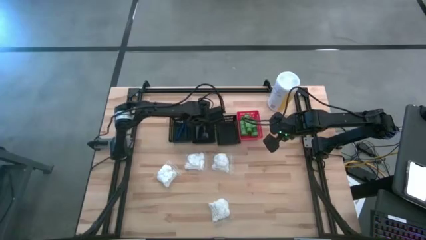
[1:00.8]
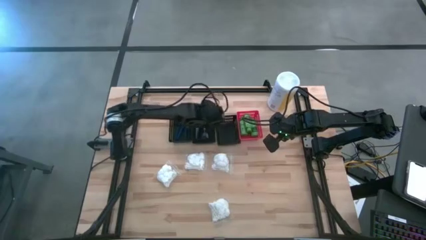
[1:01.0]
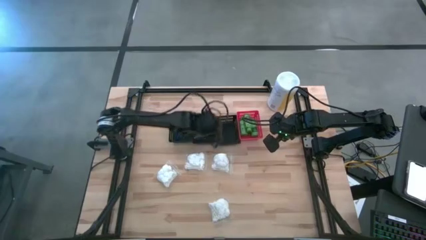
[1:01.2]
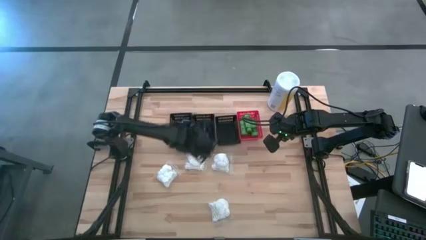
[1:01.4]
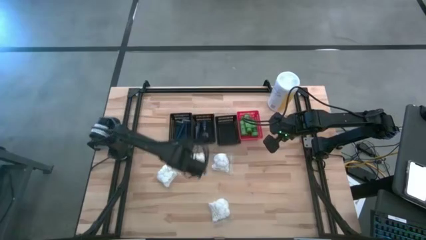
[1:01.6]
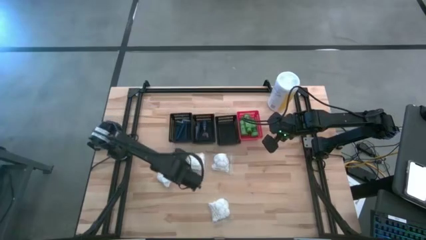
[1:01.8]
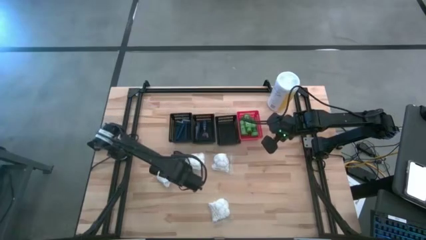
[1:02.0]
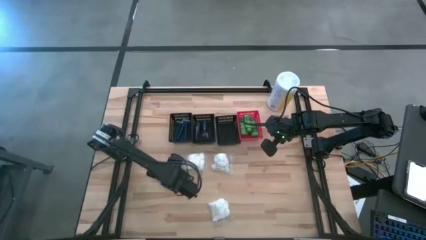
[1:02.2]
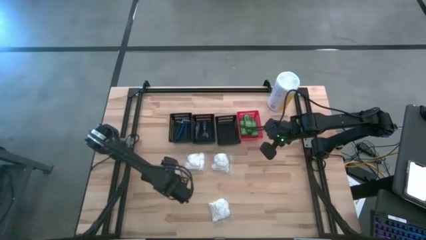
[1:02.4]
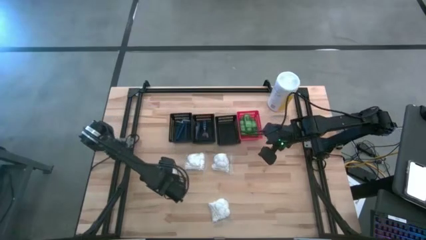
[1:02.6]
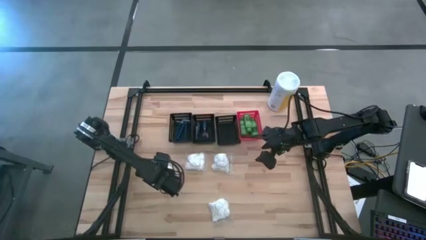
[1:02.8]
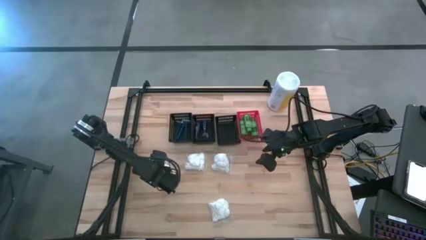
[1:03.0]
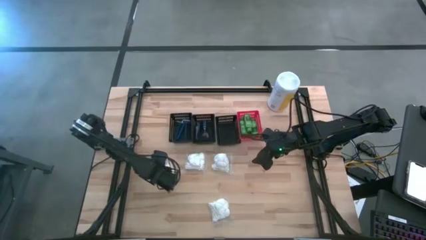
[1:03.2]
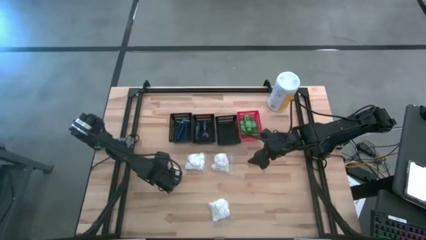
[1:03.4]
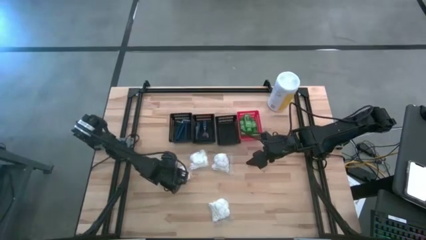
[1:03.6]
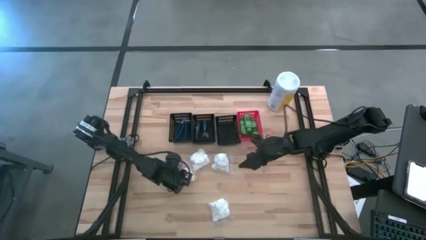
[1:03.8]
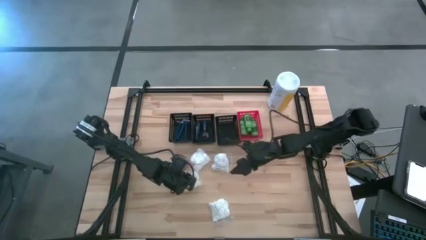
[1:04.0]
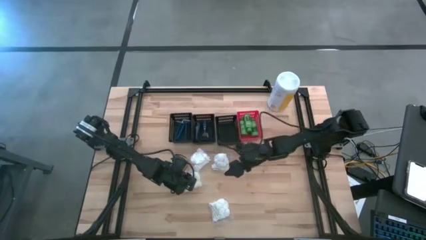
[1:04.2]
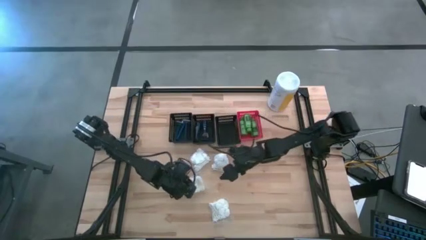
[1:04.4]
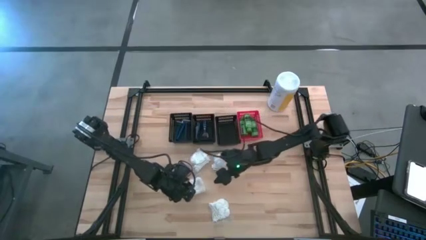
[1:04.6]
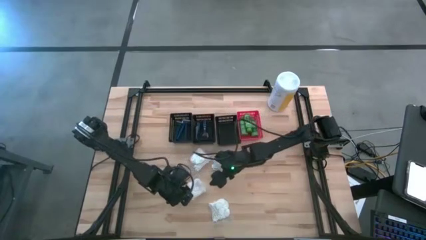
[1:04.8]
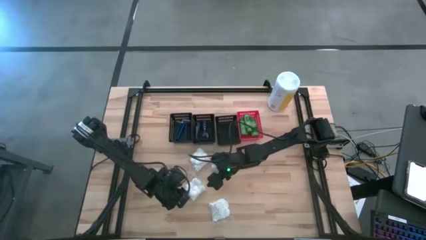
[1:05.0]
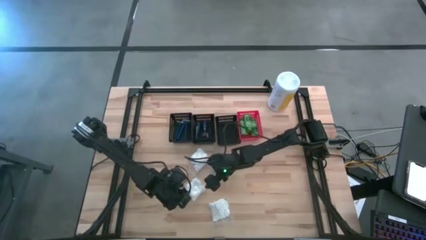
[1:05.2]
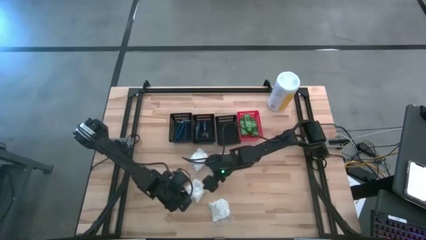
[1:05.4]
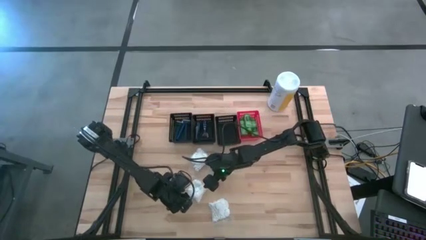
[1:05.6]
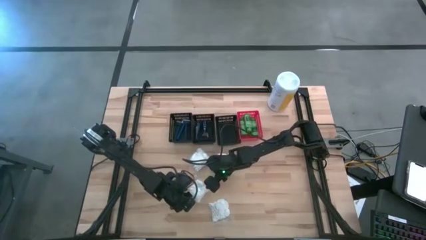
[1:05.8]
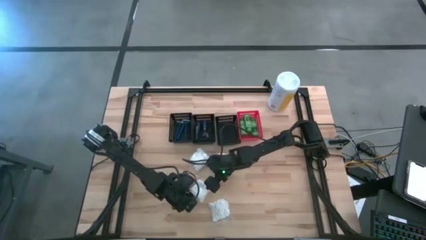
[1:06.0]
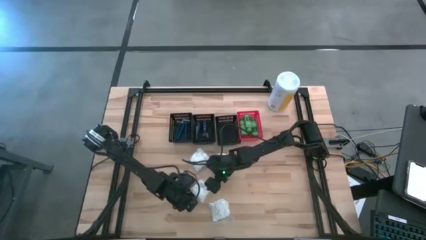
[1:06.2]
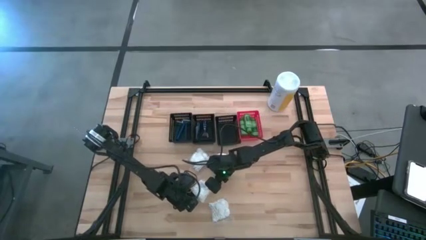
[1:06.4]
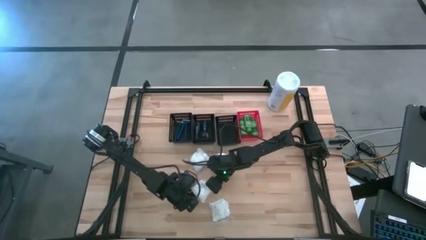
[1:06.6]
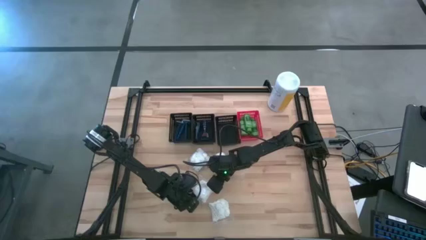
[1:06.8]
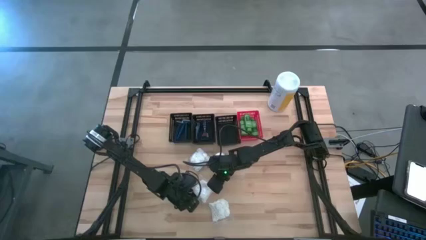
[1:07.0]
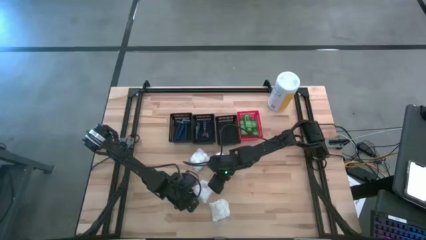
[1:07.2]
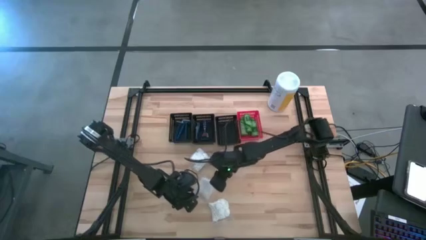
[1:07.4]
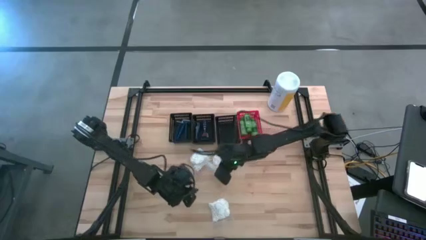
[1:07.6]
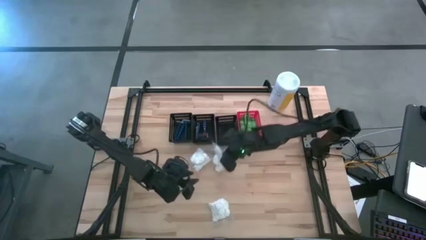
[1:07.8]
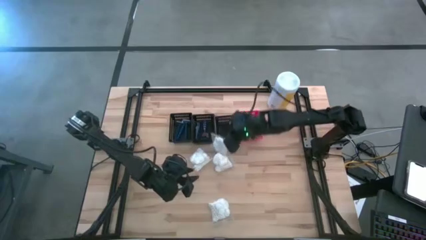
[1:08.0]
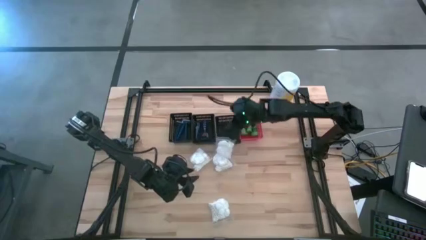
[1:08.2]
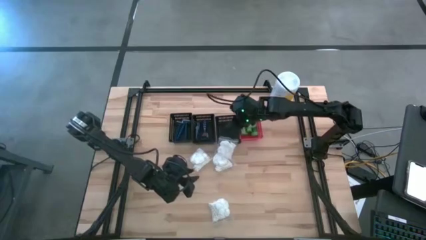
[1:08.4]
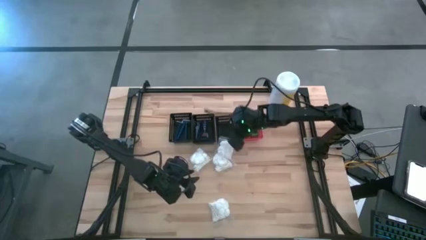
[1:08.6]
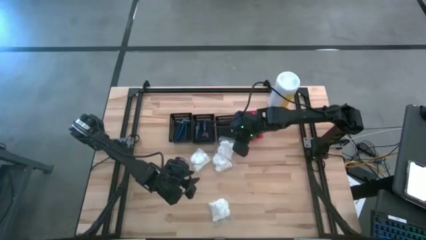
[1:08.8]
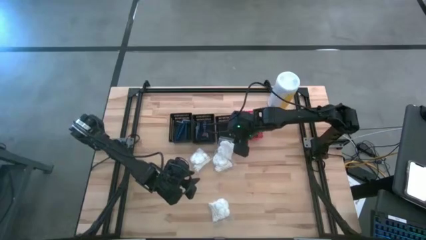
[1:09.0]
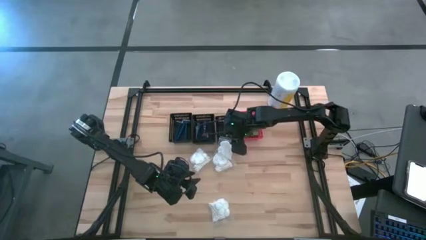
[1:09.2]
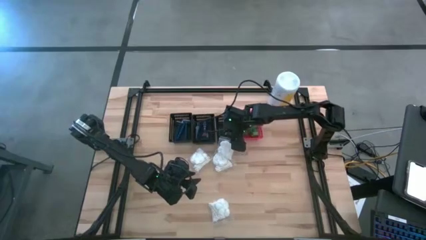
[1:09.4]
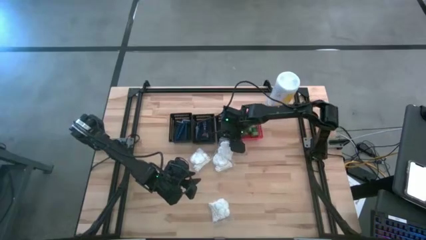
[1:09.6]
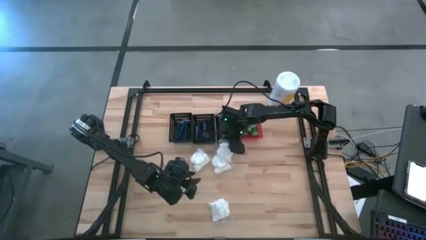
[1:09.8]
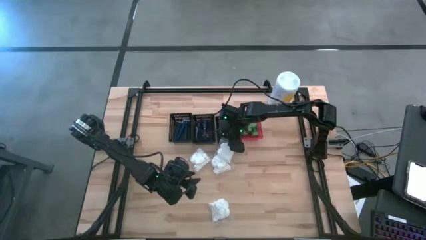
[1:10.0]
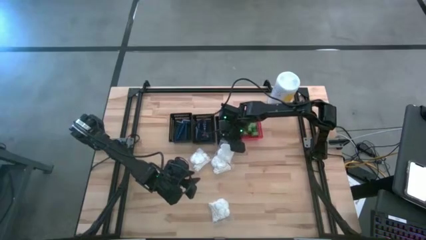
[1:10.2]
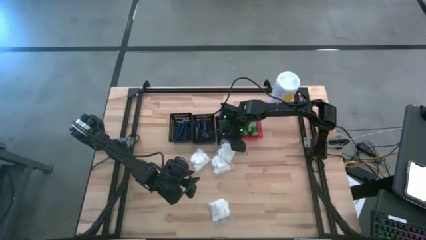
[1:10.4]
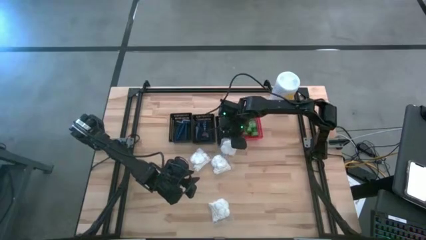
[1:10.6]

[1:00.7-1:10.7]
Task: Pick & Place Travel size toiletries
Put the white cotton pack into the right black bin

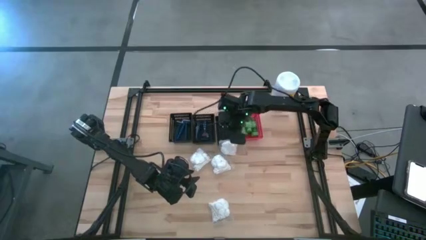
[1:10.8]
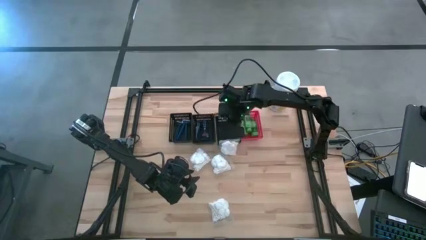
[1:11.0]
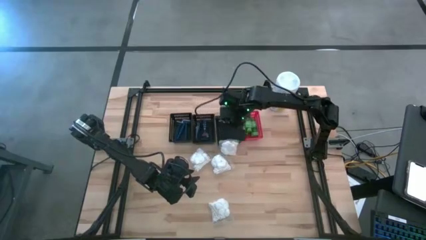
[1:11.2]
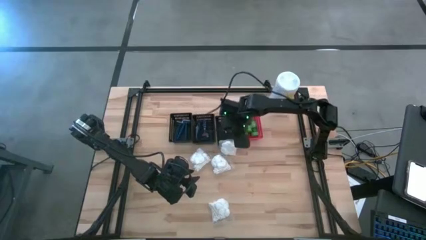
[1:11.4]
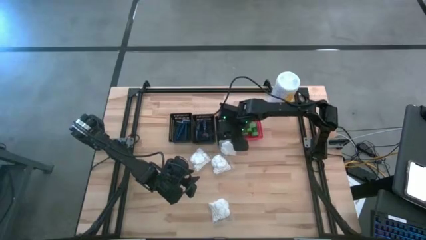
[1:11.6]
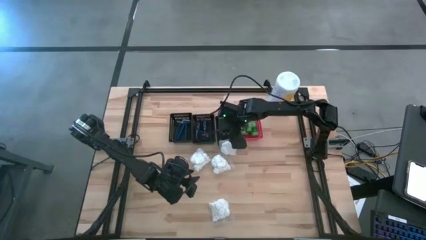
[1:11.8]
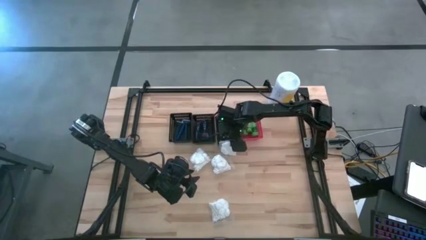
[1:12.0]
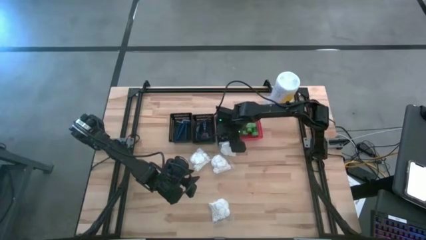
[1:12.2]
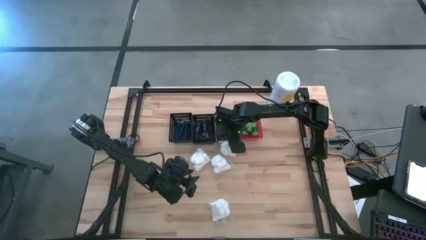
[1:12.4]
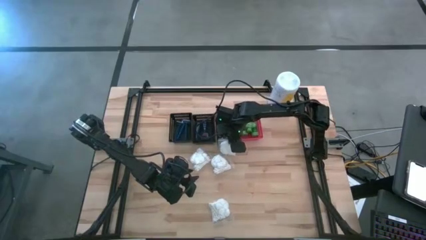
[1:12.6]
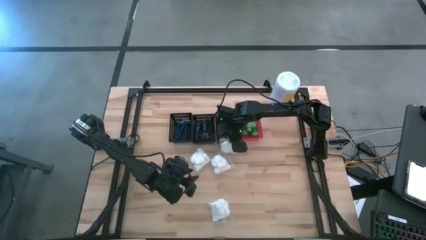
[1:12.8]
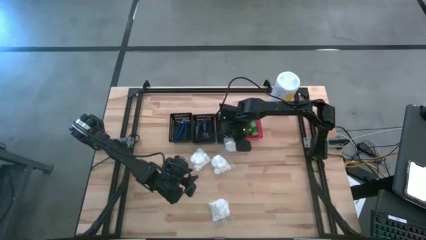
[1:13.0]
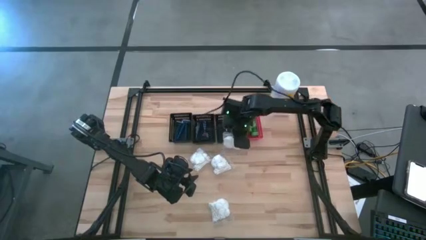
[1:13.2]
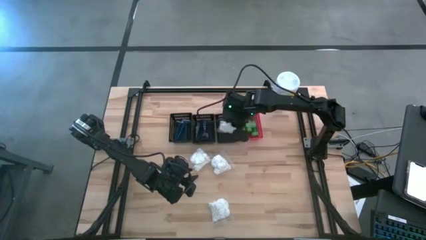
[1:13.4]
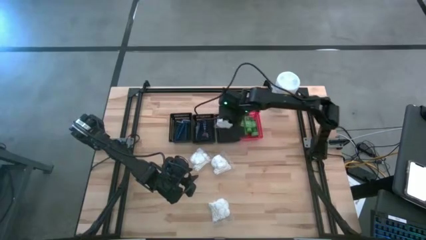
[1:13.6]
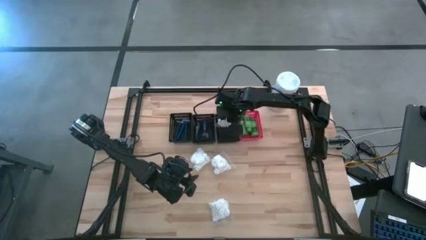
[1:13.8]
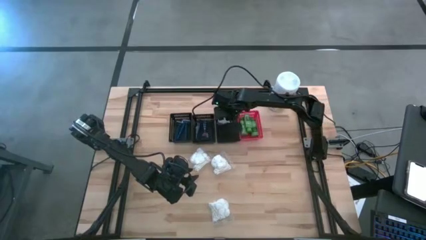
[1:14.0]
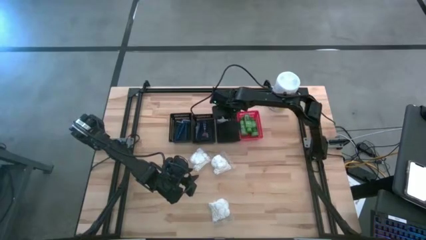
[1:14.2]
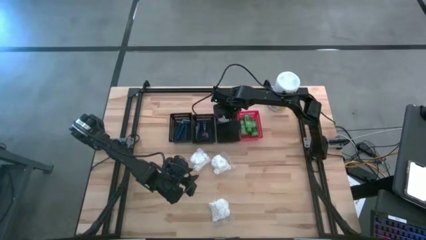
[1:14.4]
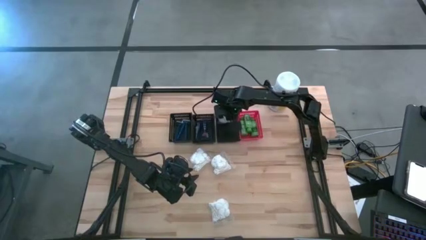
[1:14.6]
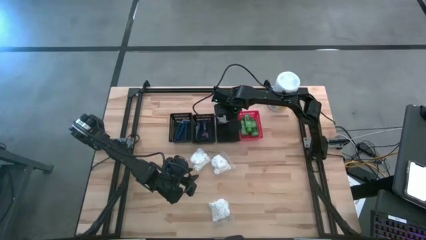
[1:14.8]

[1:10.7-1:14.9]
Put the white cotton pack into the right black bin

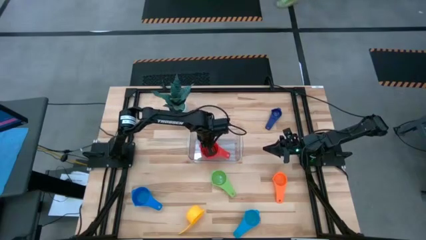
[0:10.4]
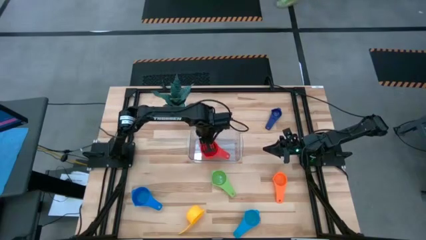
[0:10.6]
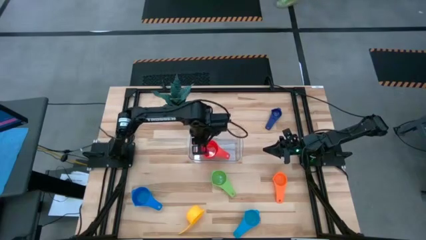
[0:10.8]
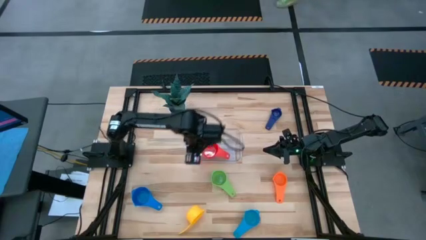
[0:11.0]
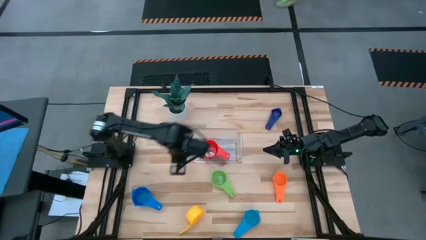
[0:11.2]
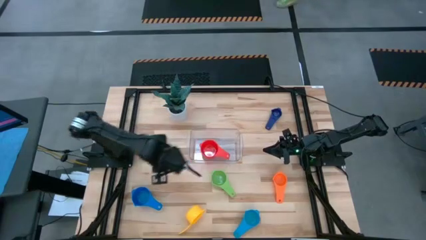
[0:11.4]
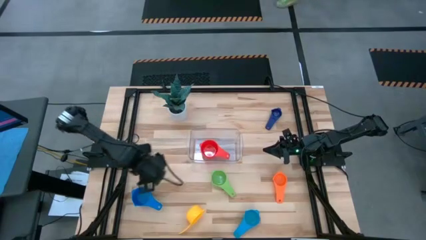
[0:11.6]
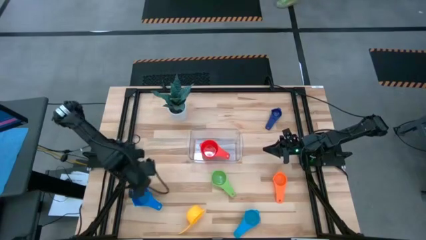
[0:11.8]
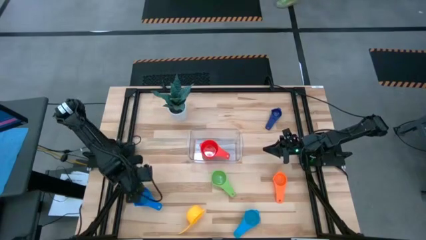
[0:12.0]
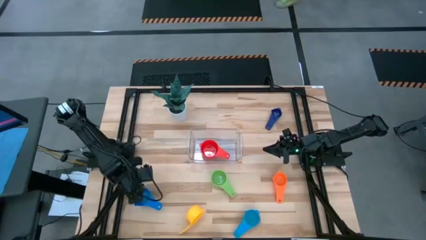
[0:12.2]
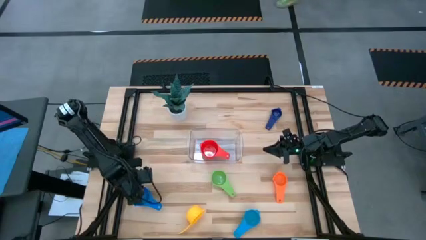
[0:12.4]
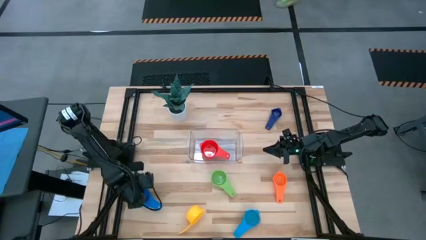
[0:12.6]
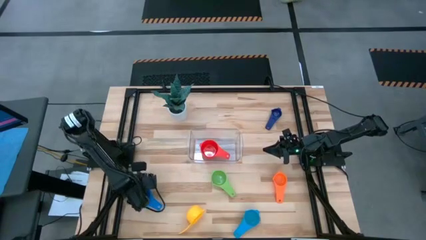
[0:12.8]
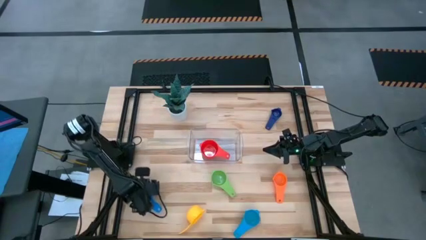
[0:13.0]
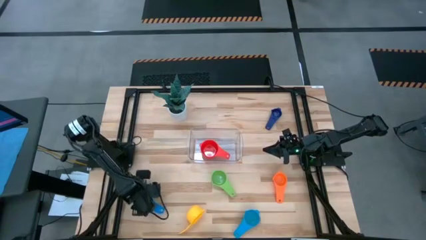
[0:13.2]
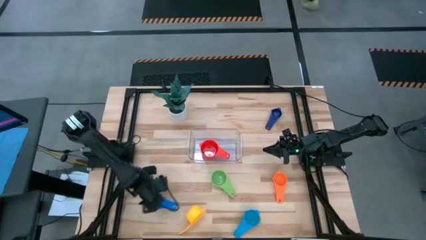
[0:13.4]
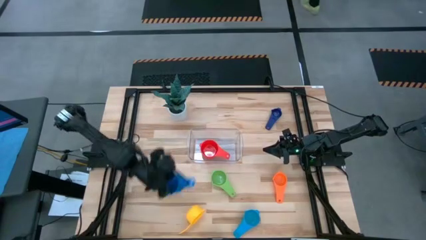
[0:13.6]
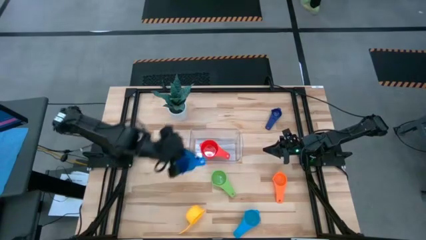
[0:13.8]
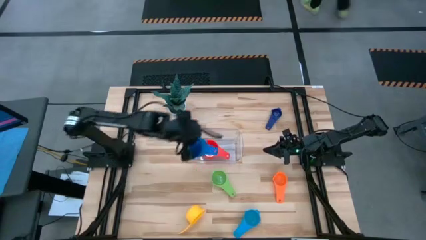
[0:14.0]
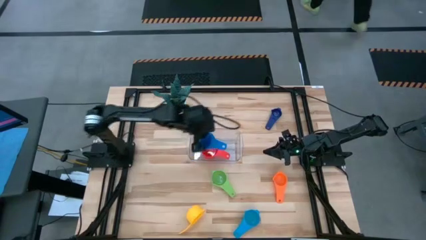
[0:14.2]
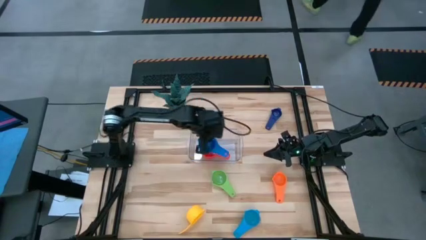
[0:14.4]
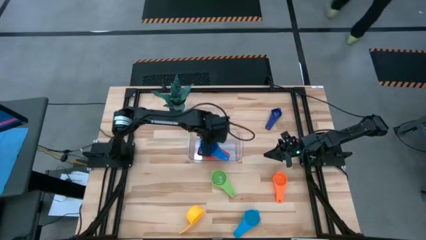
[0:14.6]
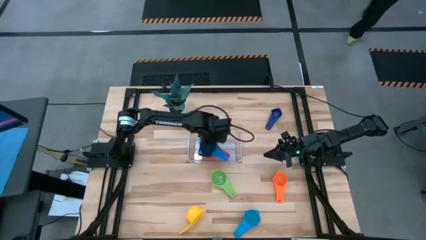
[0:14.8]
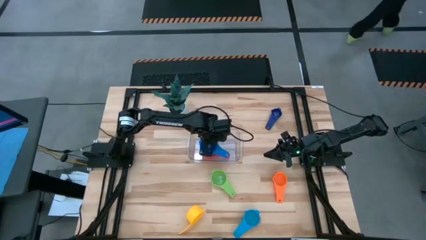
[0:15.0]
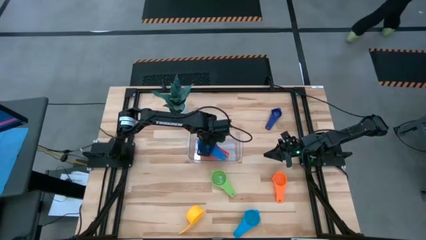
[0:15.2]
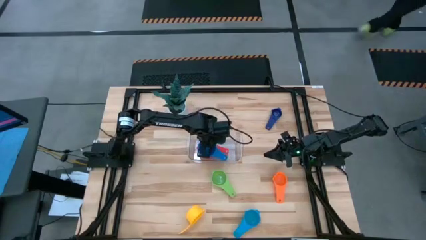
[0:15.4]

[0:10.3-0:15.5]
Task: Nest measuring cups in basket
Stack the blue measuring cup into the red measuring cup
